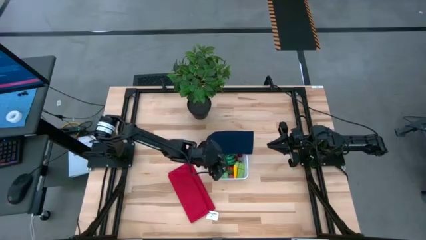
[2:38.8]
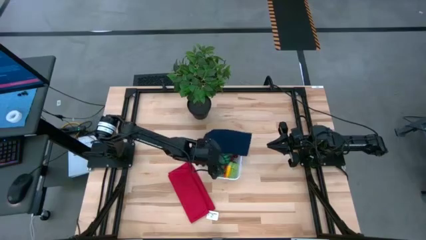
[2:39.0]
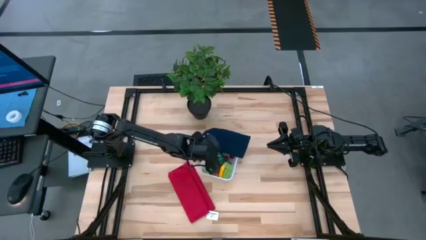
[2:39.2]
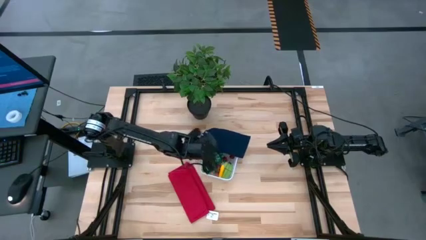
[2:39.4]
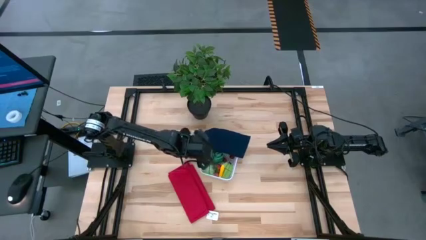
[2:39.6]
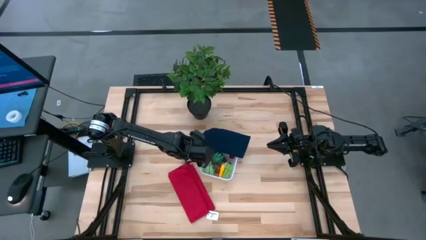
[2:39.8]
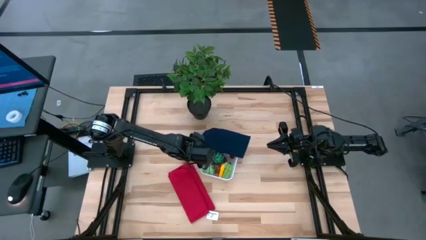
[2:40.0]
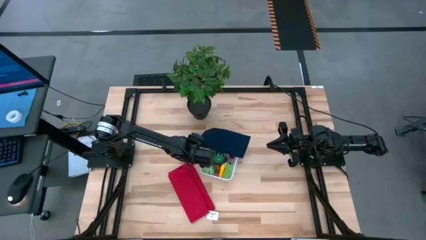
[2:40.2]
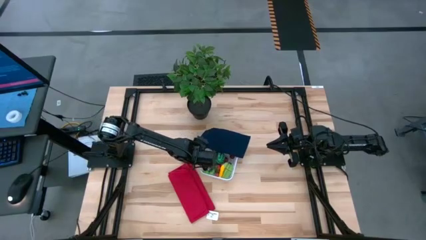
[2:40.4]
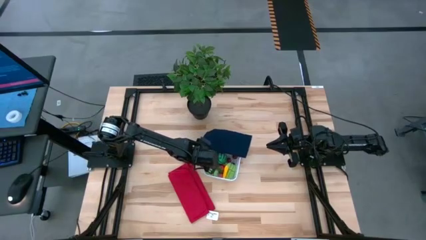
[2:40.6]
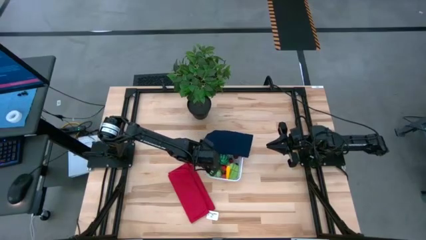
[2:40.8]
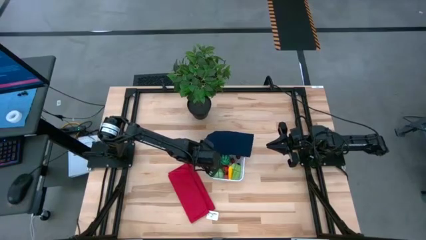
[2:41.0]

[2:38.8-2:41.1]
Task: Pick and placing Produce into tupperware
Adjust the bin on the table

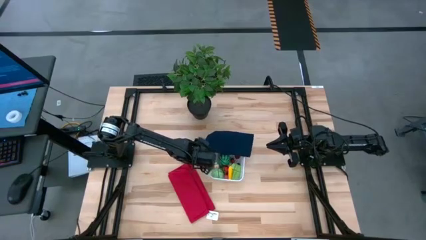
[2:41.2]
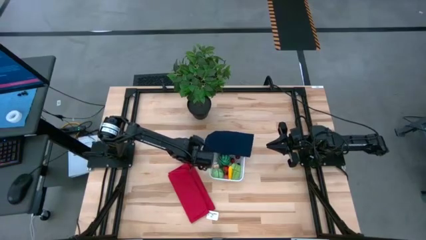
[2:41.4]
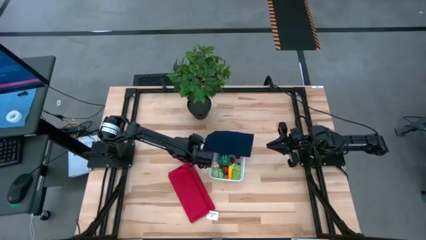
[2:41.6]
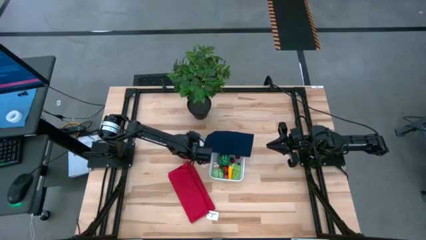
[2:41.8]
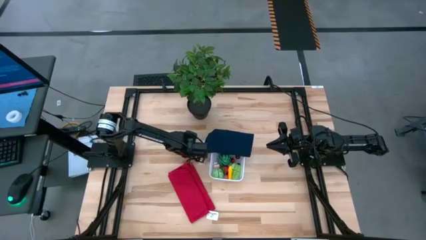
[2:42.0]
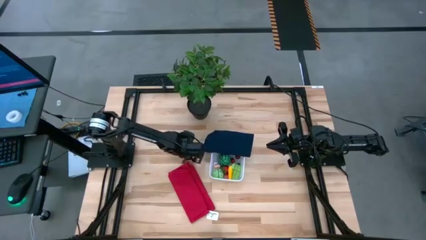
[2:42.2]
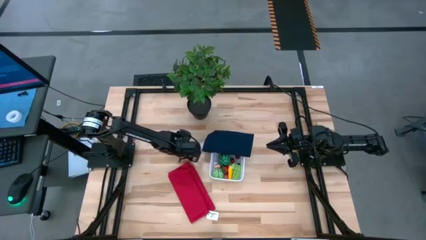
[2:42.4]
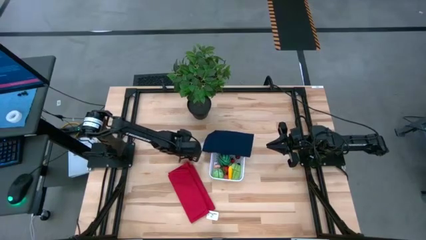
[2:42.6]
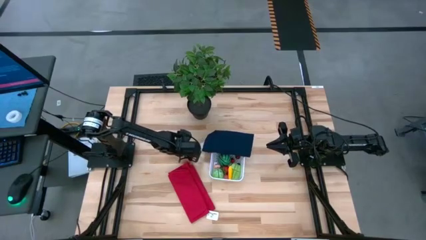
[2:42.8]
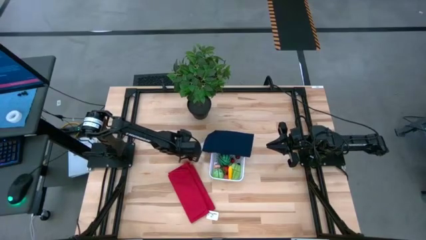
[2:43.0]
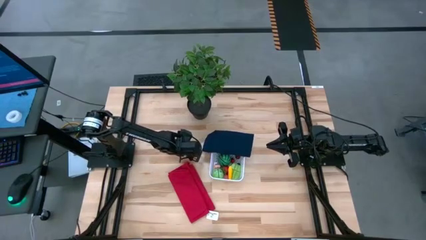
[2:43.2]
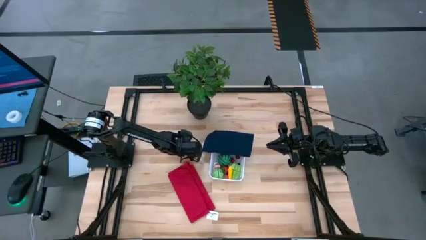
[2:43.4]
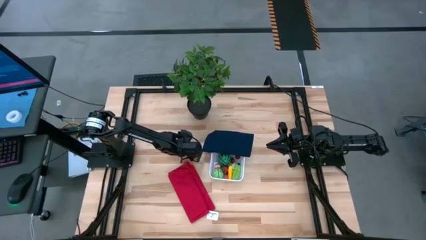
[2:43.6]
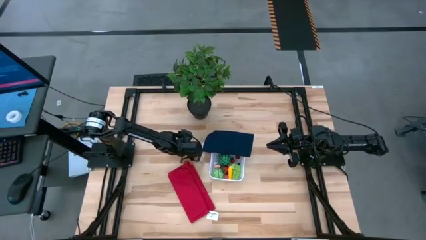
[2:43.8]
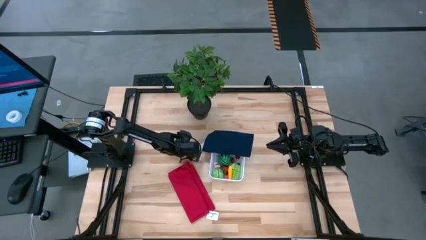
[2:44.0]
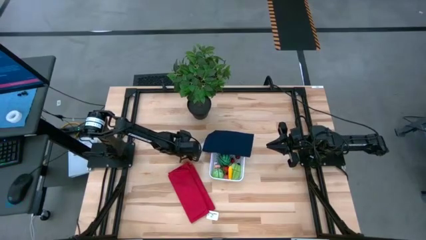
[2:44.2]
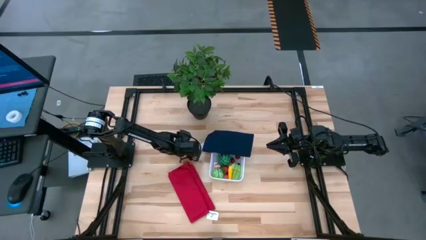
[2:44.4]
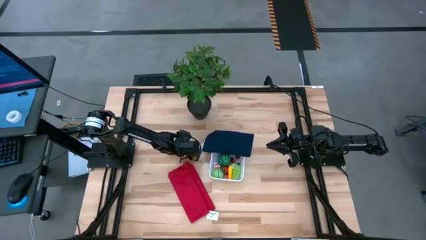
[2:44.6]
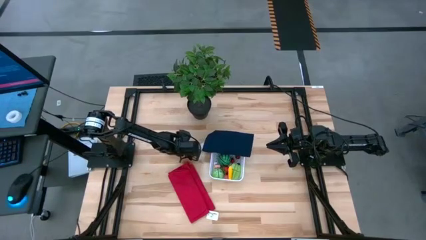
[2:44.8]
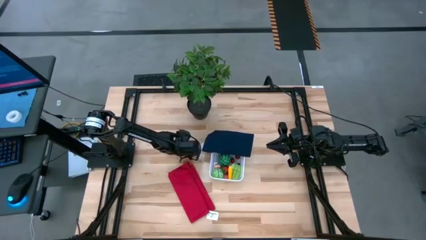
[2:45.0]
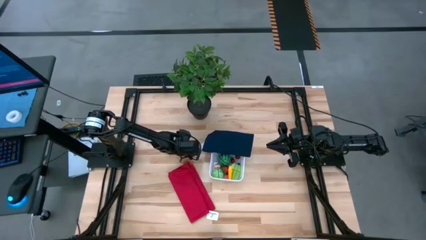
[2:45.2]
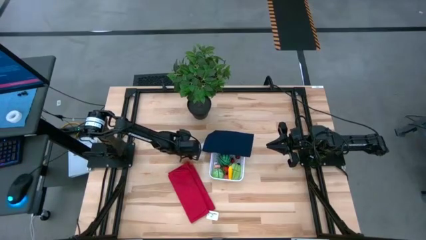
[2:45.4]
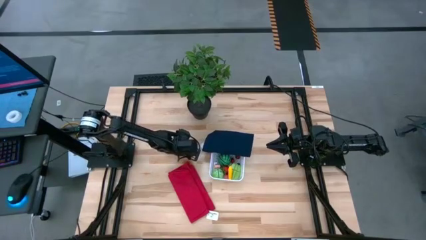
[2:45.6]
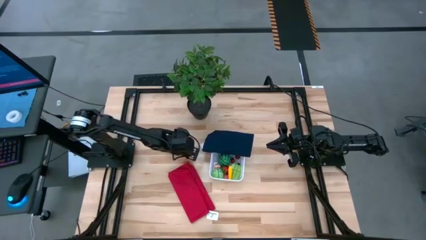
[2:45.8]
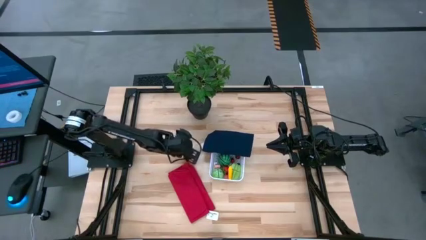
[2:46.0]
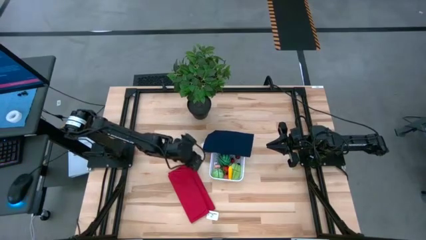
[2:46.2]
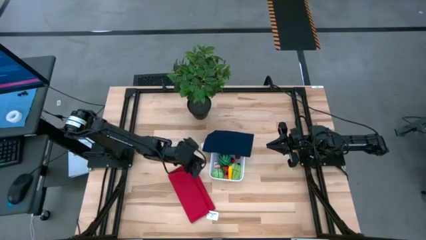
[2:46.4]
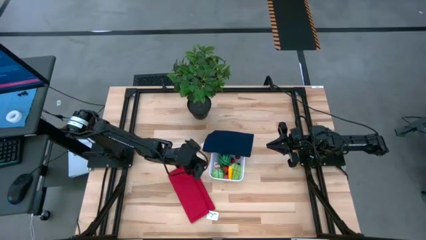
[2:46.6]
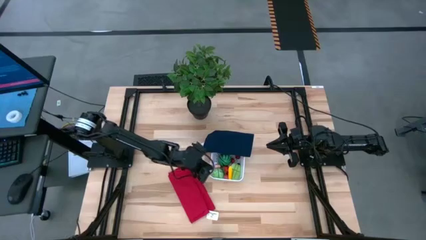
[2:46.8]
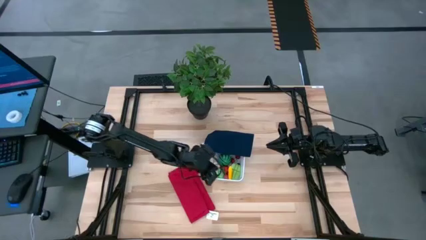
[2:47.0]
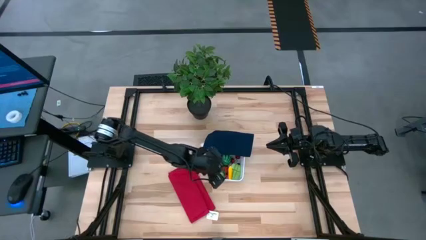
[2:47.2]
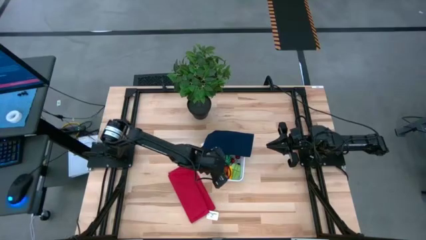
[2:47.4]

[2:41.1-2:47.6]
Put the blueberry into the bin

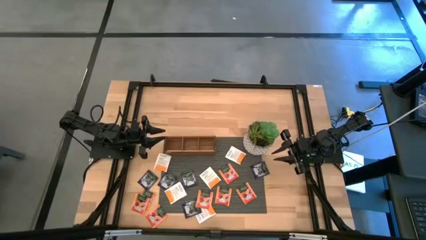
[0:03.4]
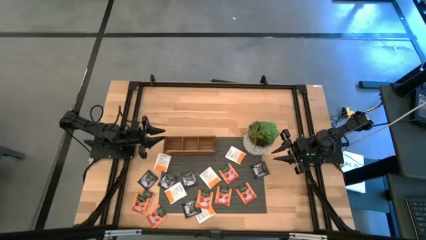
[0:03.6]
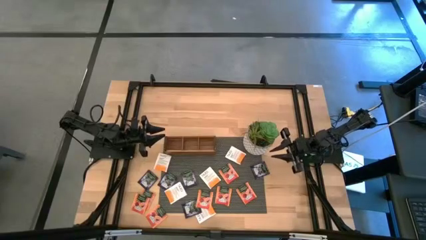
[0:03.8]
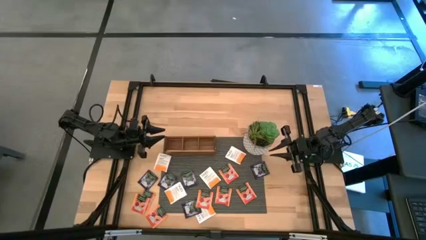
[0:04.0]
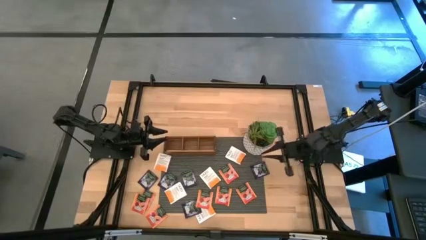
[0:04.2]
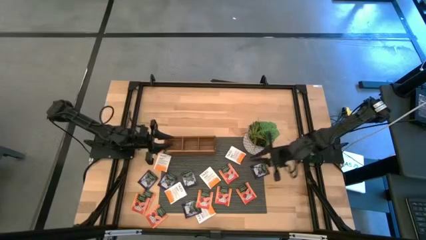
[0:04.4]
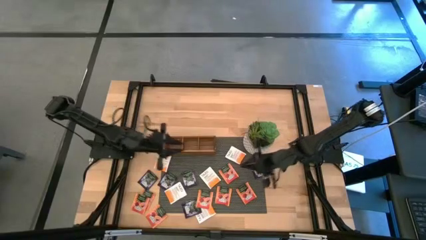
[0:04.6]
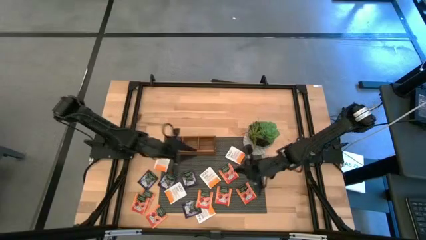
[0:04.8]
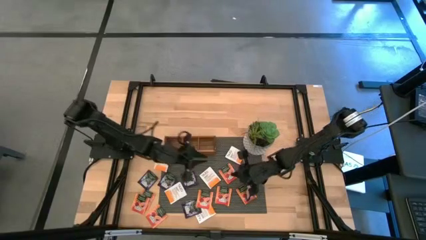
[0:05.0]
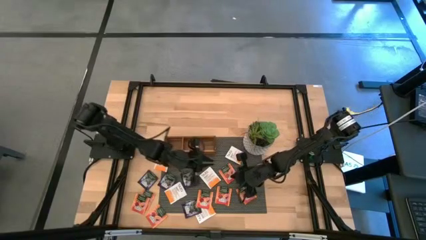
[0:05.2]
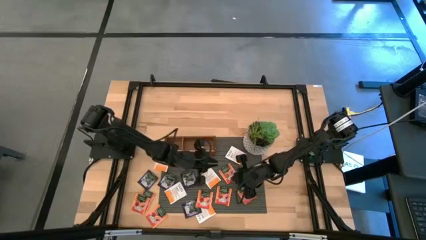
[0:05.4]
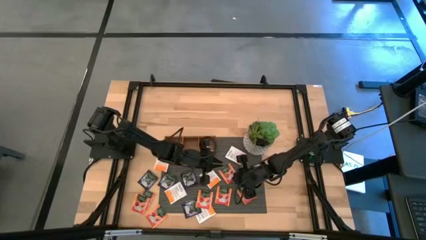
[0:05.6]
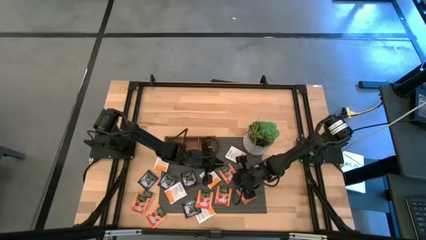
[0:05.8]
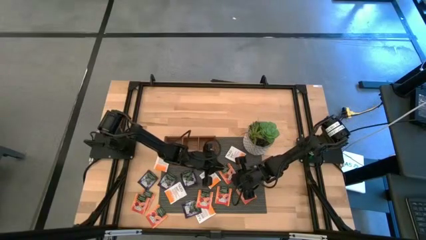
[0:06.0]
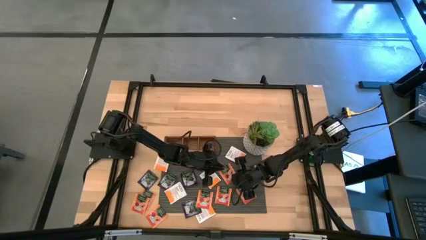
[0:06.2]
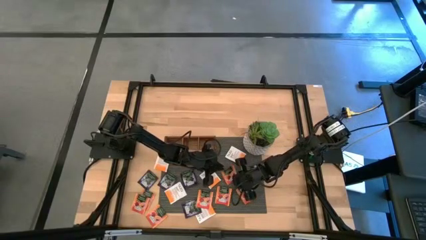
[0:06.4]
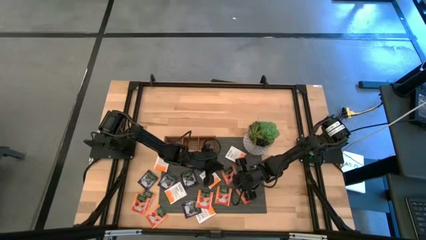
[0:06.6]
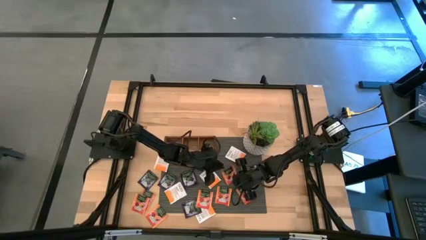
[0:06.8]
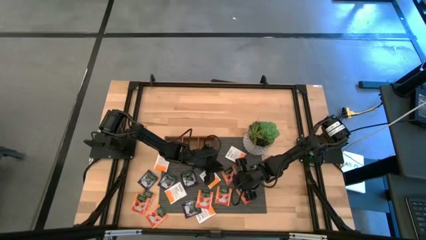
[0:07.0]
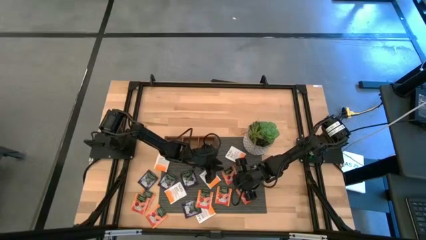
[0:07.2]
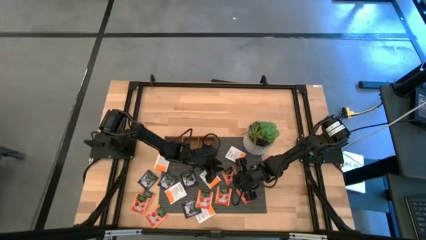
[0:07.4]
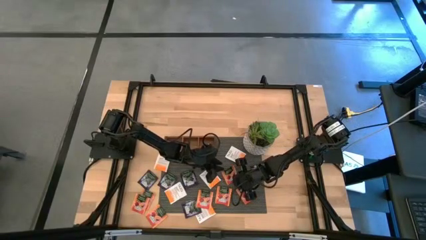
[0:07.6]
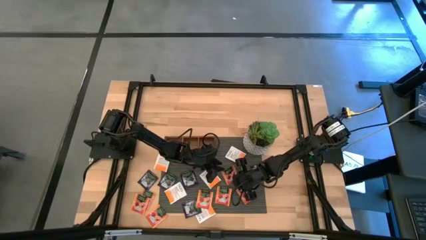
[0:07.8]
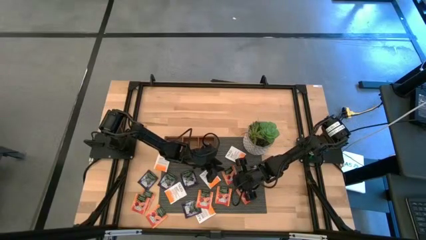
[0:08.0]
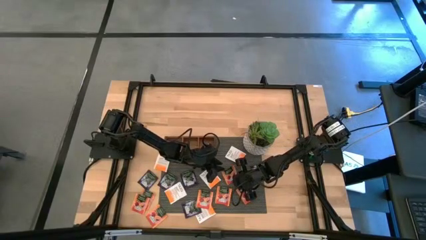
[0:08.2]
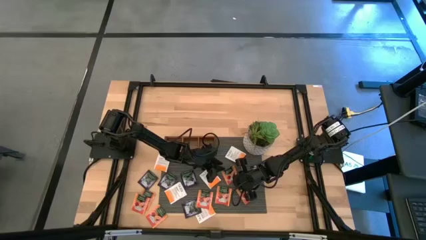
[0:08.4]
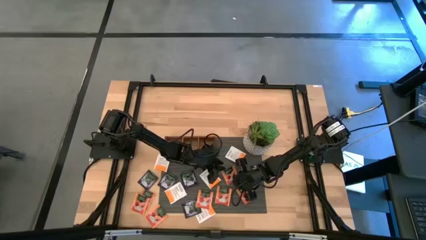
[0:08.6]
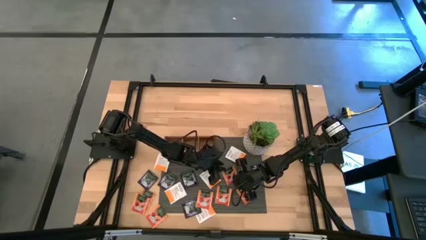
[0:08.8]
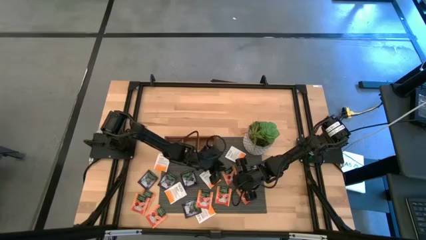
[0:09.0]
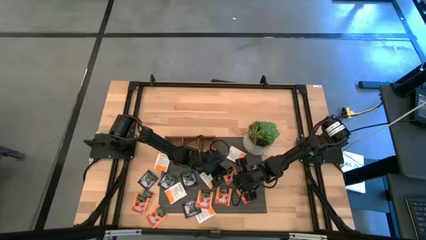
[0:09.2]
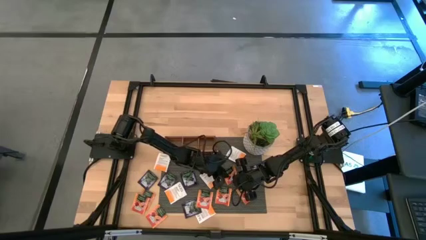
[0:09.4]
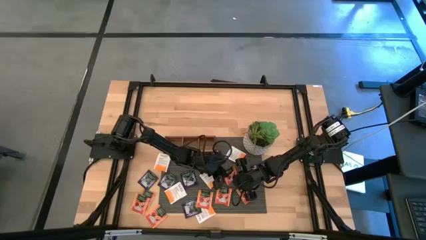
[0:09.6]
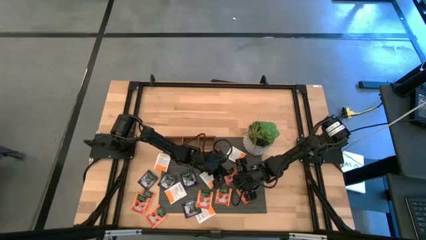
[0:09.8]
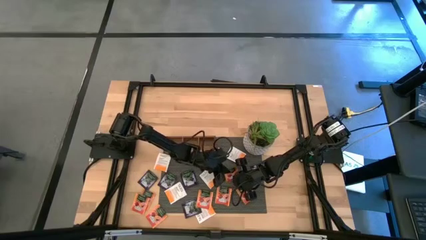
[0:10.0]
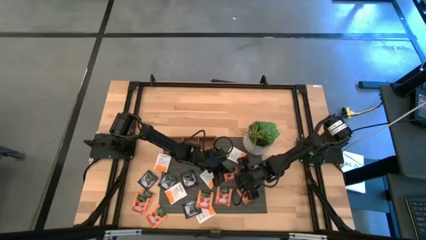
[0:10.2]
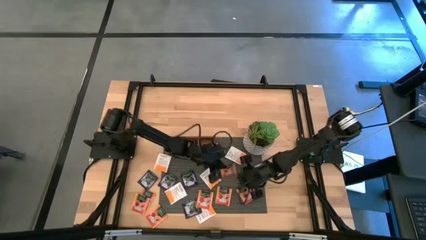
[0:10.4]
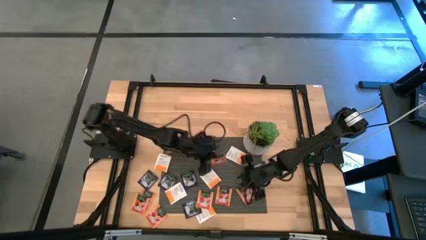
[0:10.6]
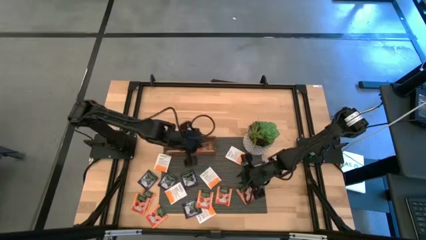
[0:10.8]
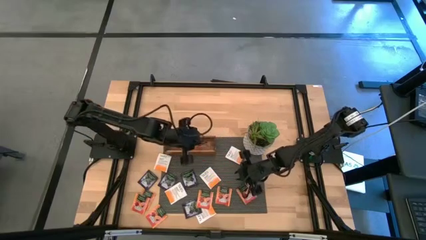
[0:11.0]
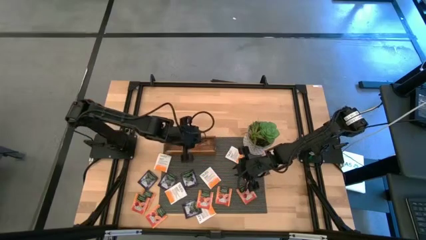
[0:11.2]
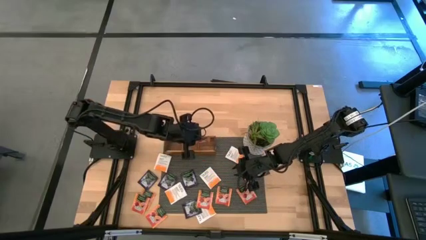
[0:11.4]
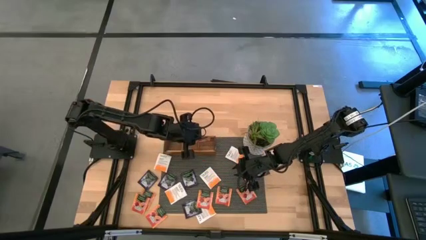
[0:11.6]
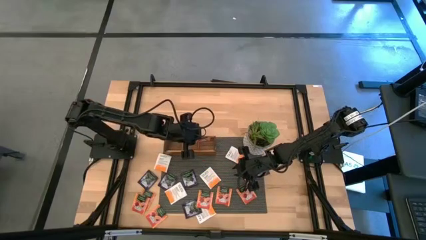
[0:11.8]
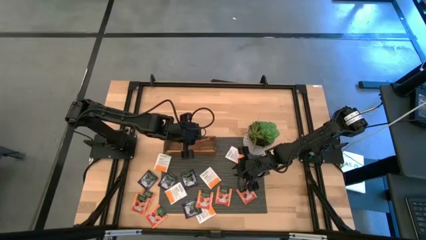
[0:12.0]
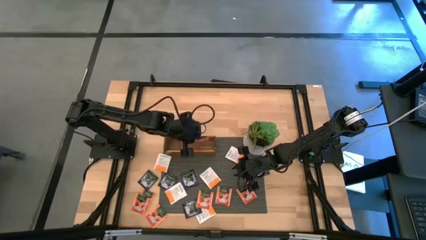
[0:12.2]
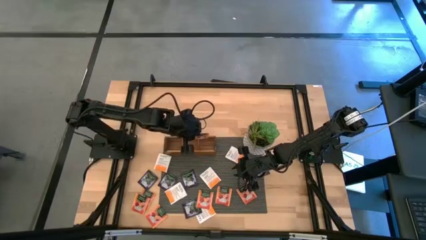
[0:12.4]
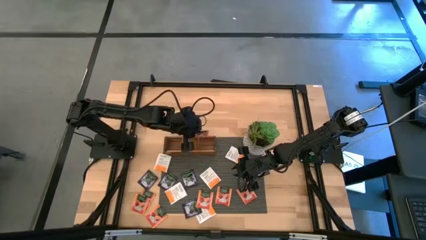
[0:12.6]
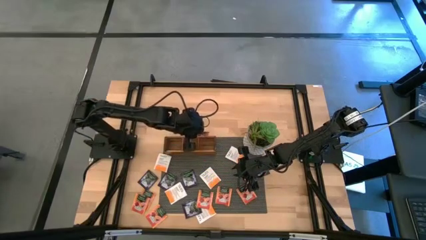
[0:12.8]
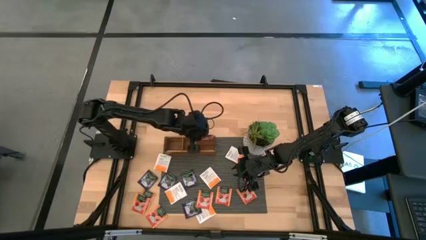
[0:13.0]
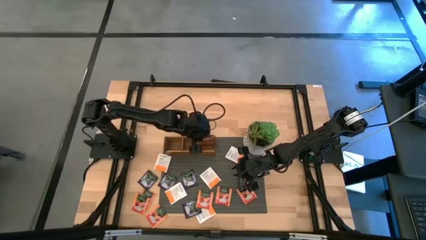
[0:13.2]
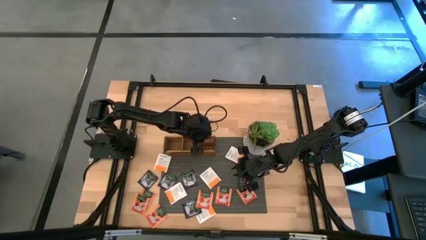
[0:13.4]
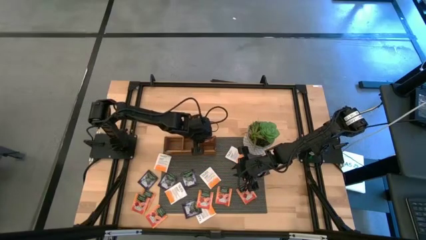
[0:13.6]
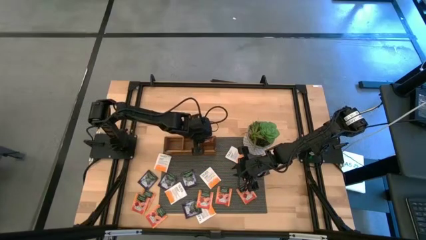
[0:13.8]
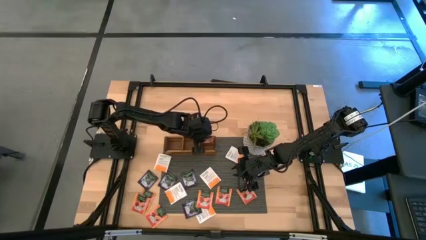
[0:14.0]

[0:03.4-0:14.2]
Task: Pick & Place Tea
Put the orange tea bag to the right section of the wooden organizer
